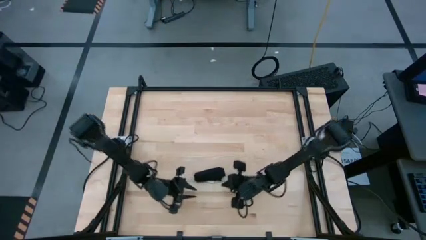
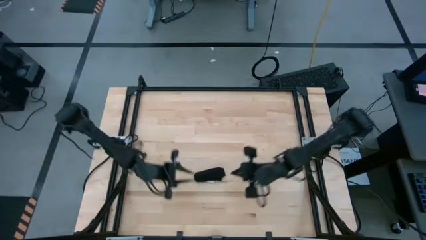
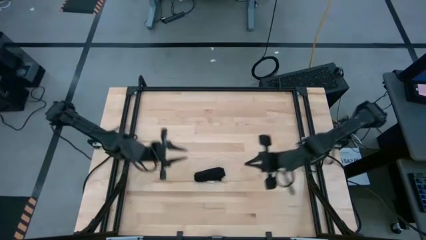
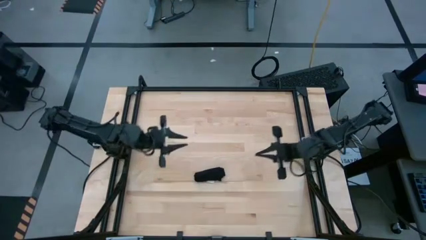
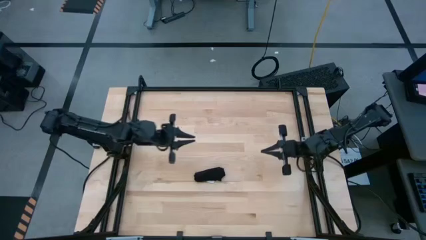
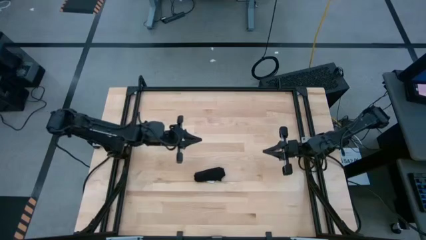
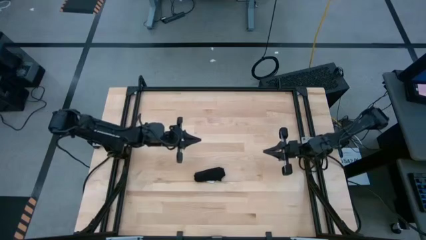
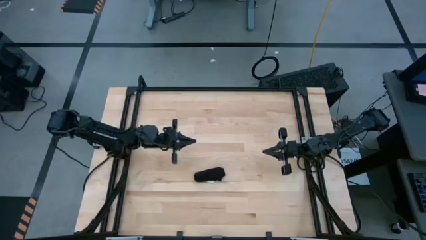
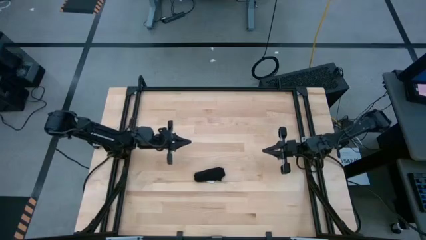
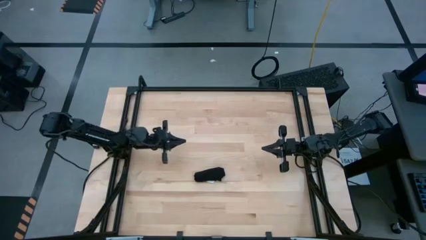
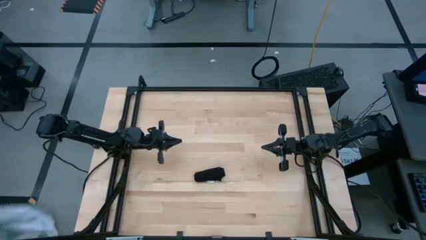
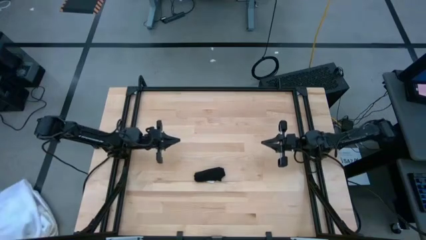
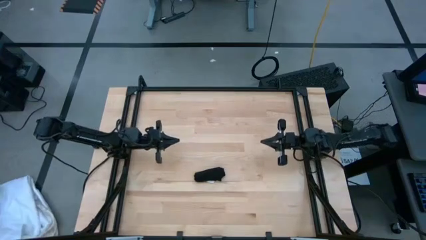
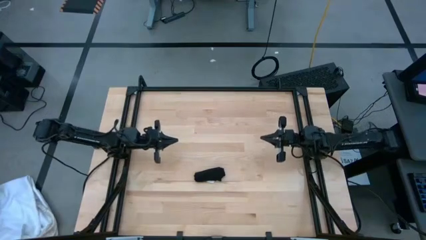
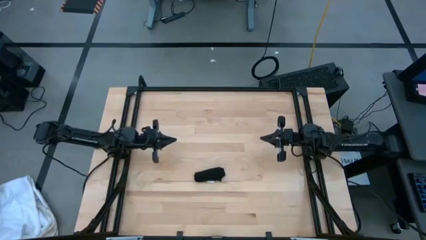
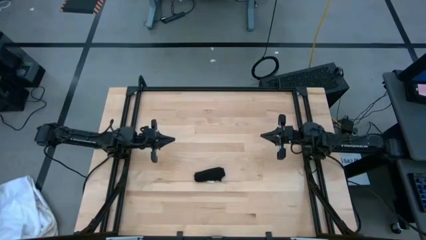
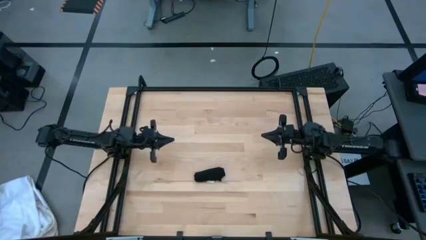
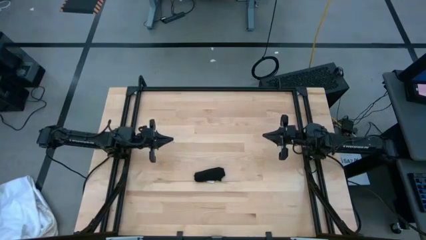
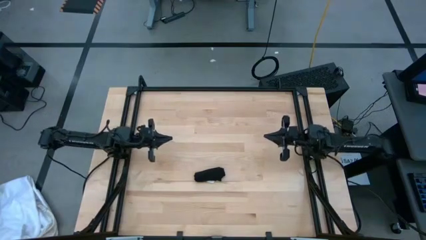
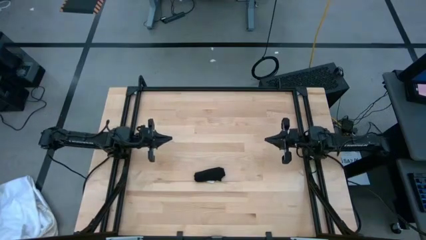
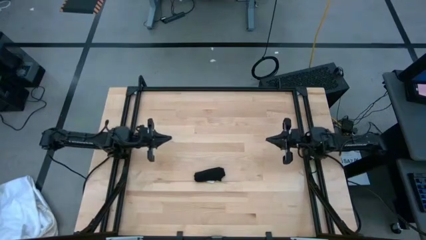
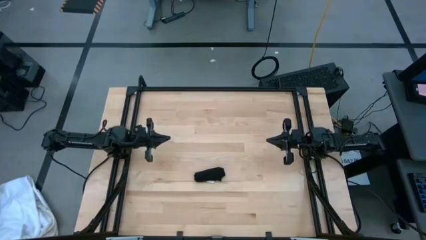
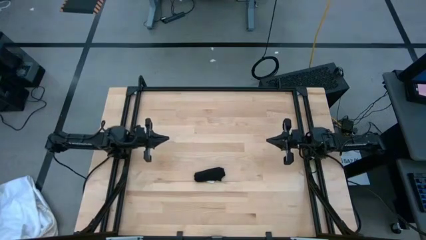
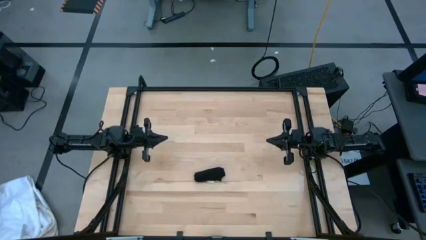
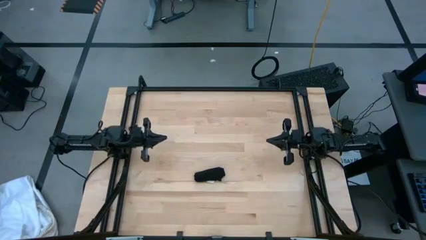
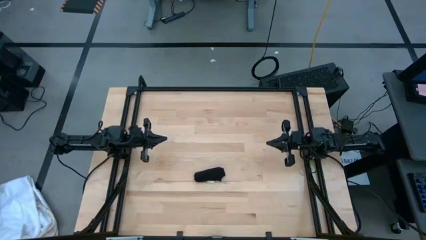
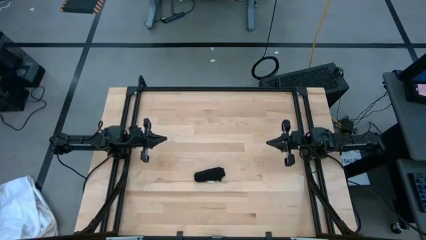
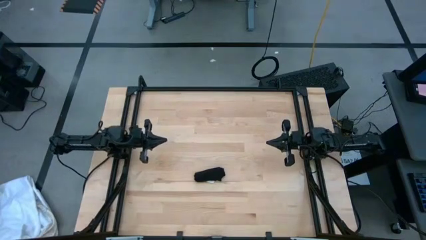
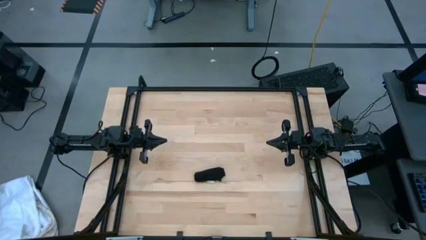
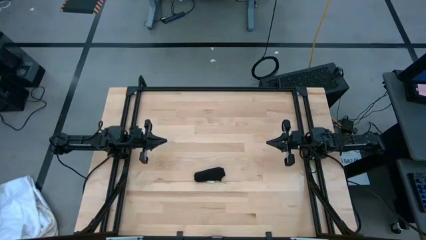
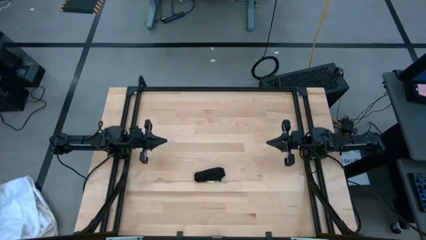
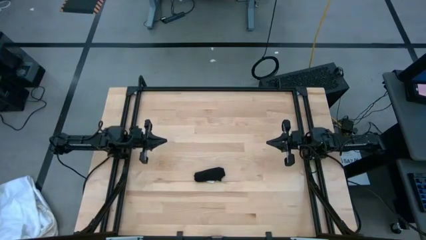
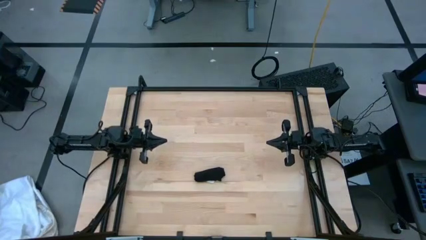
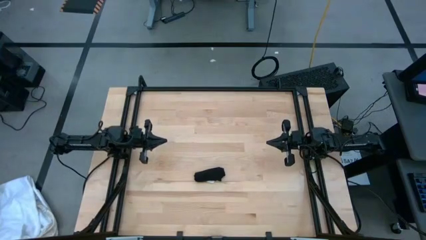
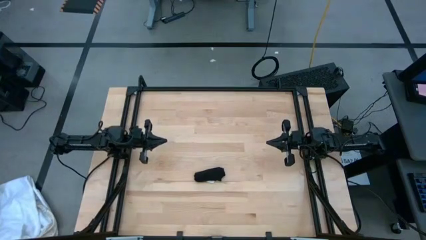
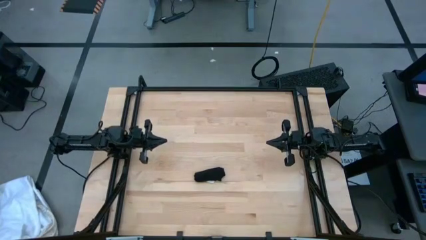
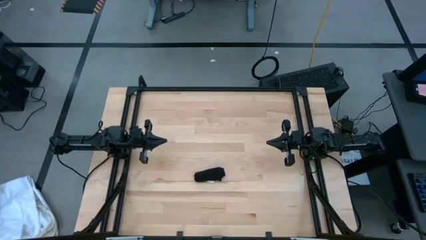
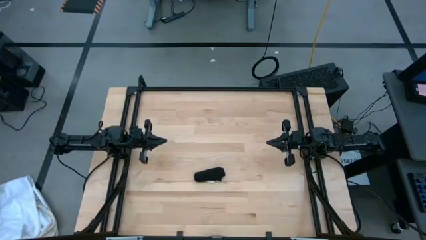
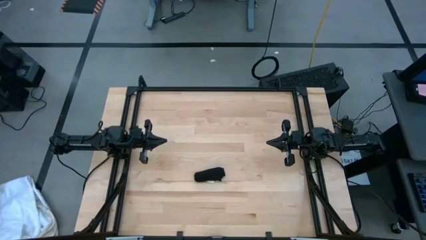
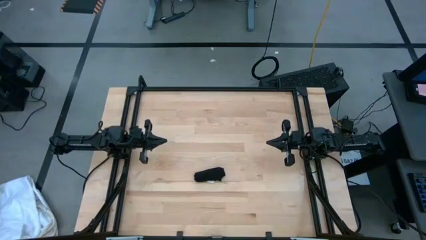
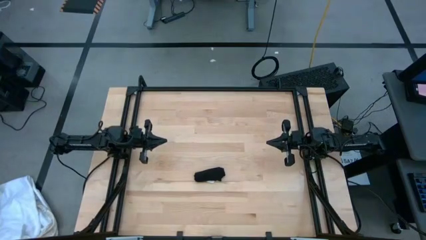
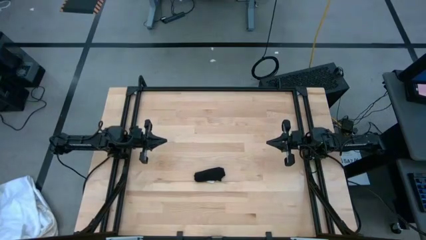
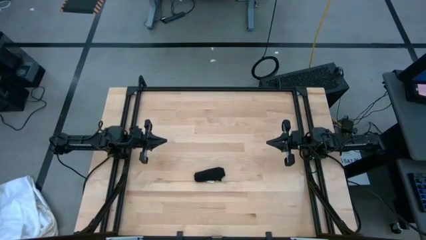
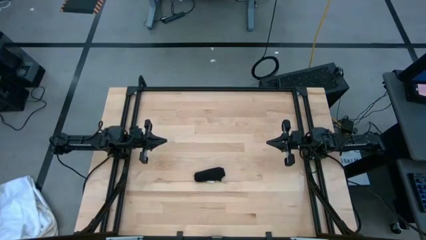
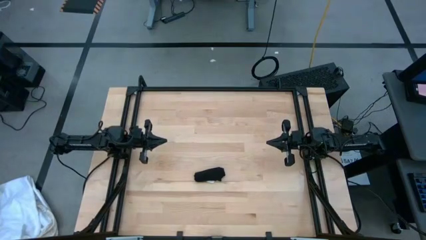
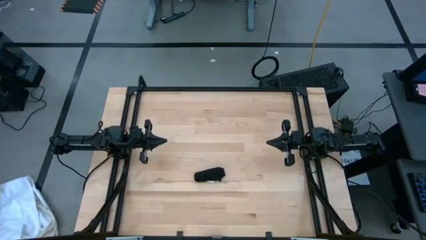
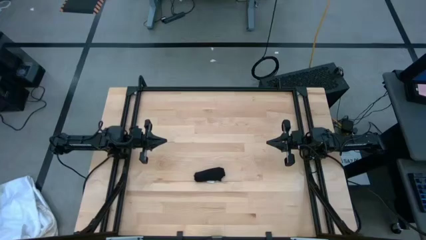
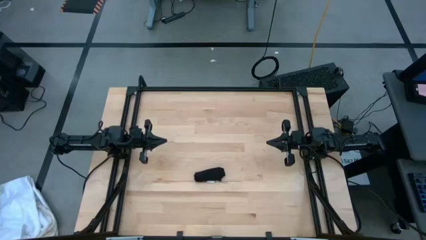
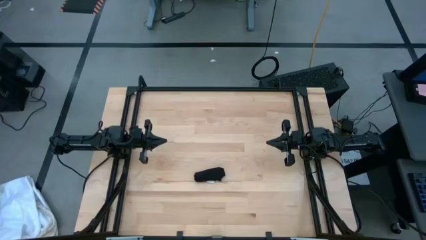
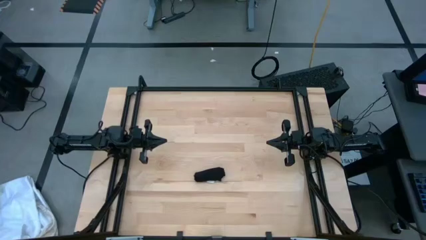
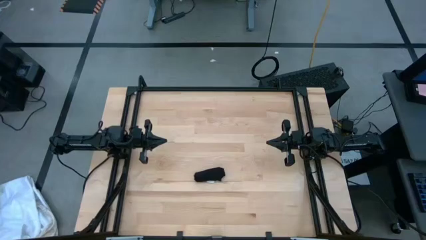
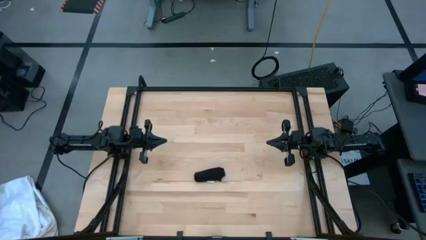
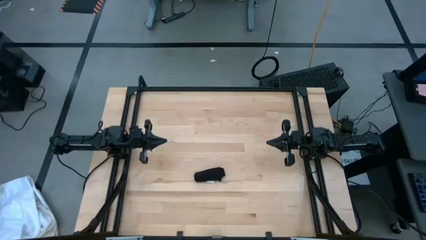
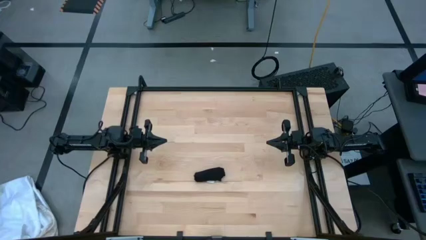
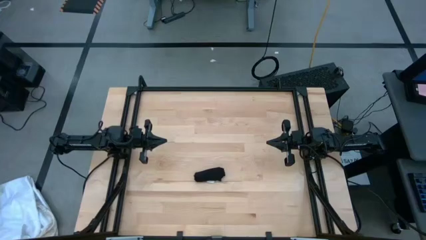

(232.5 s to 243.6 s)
Task: Roll napkin
Return to Home Position

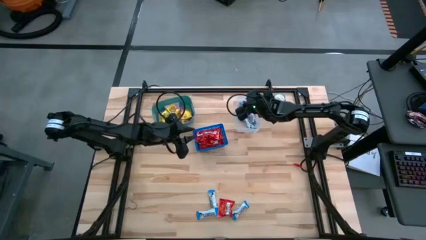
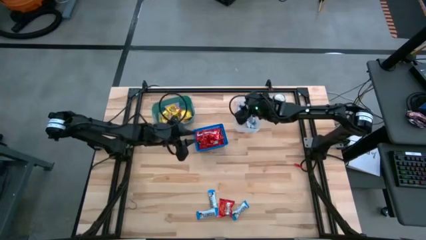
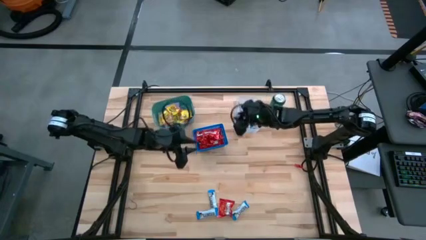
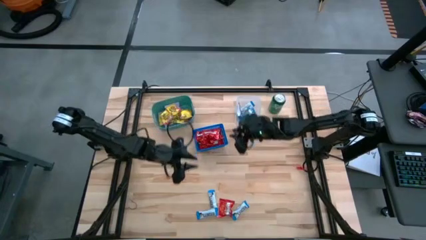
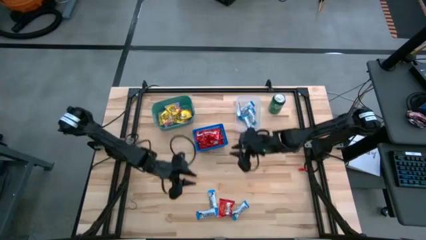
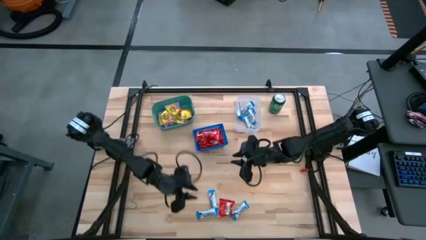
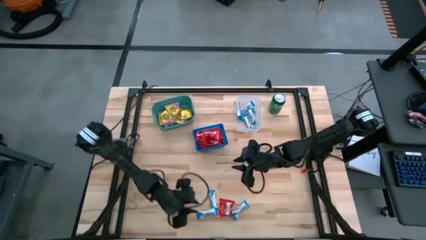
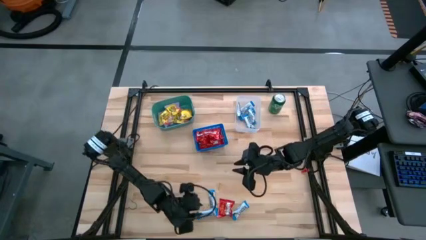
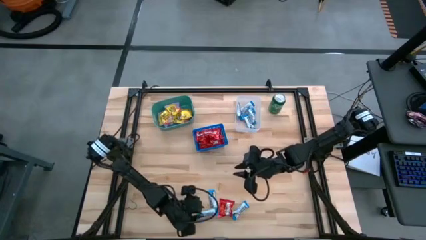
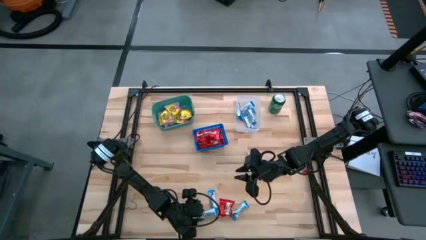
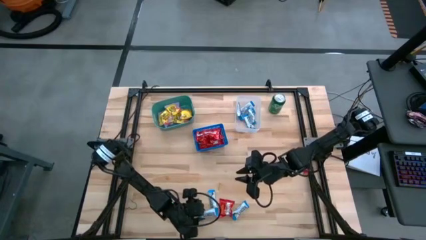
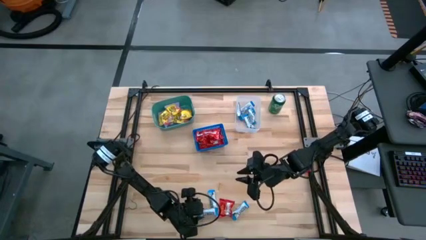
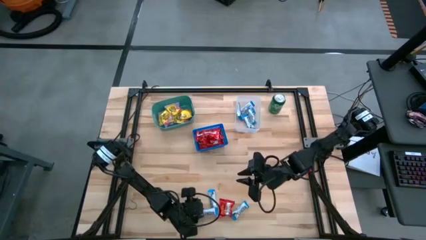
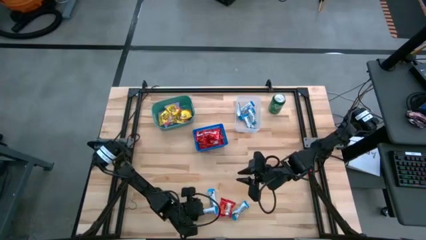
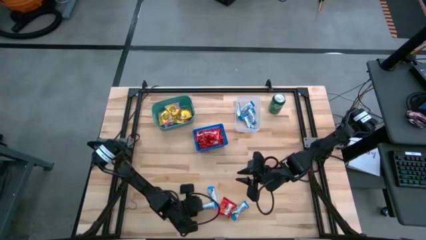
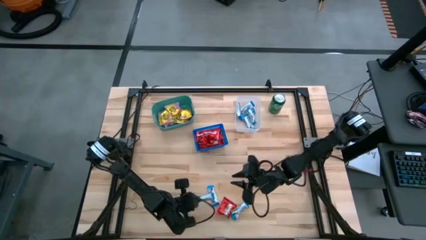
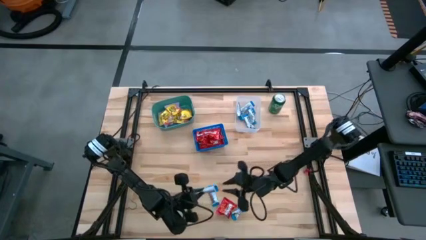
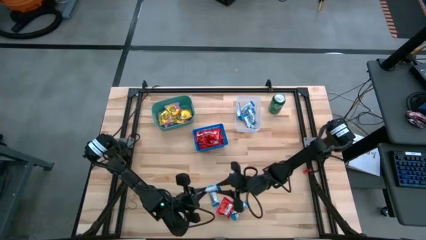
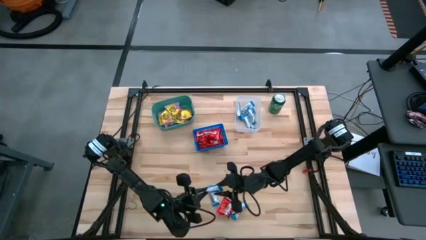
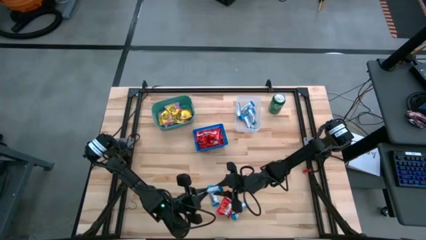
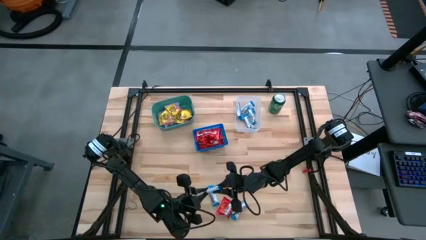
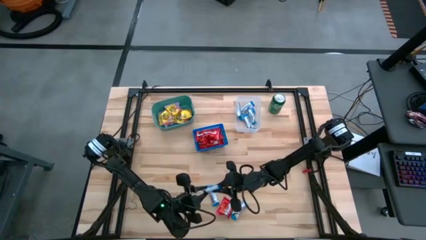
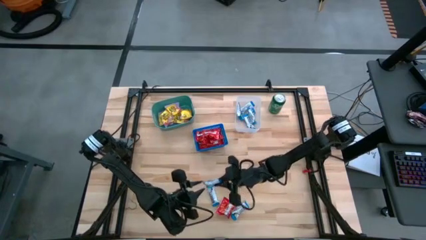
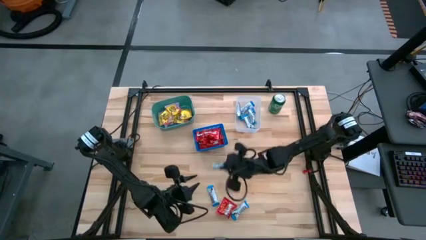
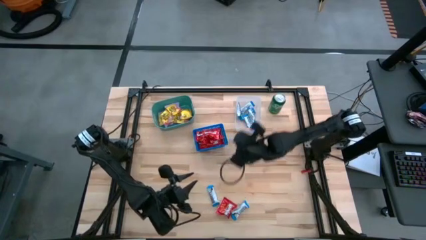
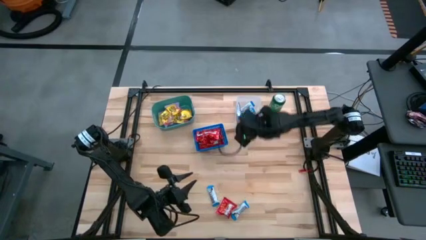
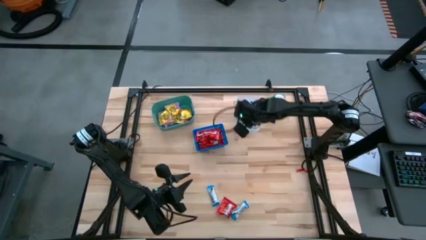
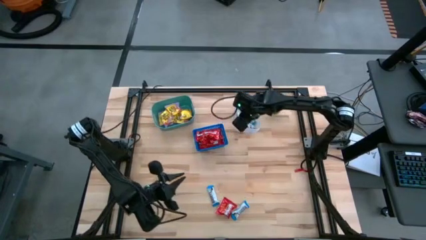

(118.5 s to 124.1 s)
Task: Sort candy
Put the hersheys bar into the transparent bin
